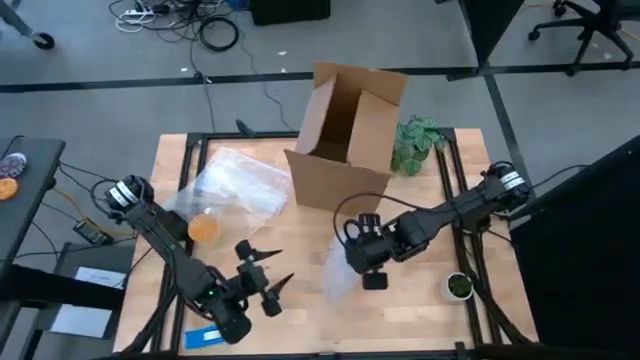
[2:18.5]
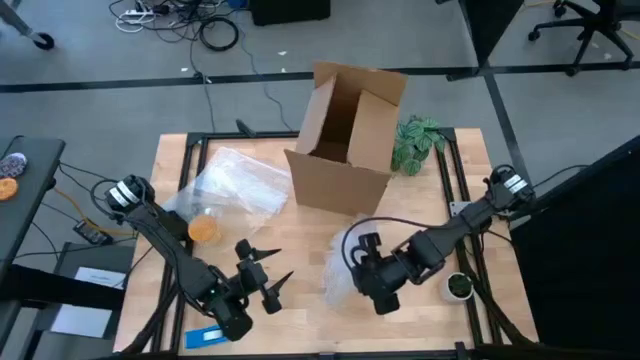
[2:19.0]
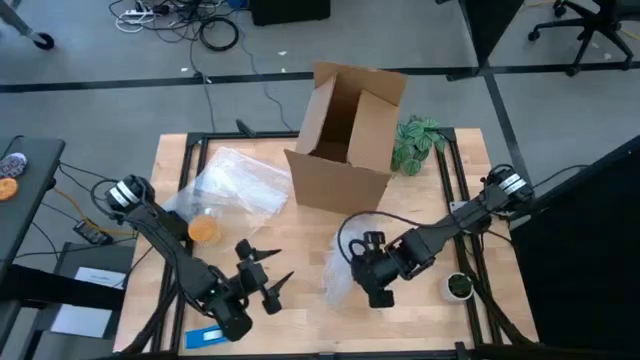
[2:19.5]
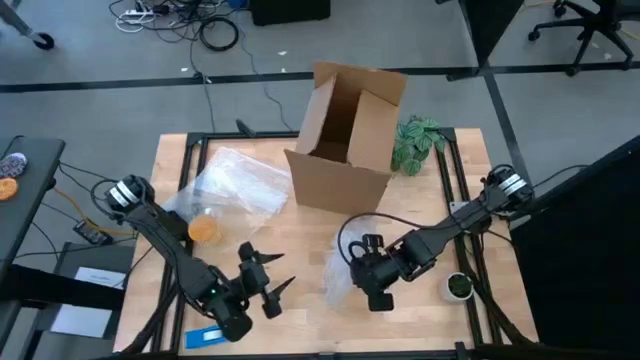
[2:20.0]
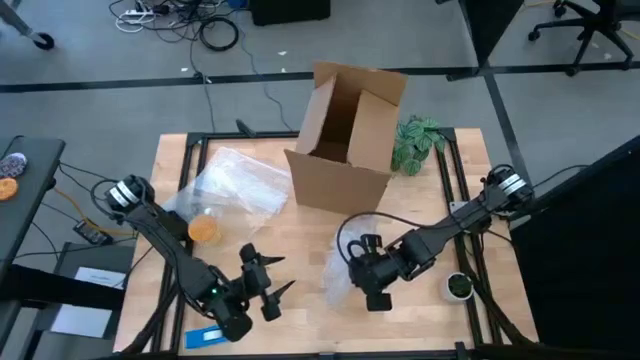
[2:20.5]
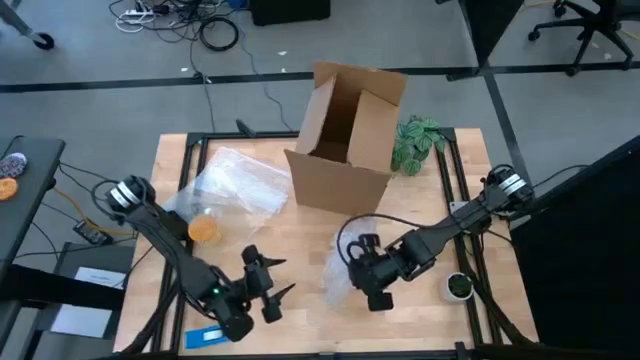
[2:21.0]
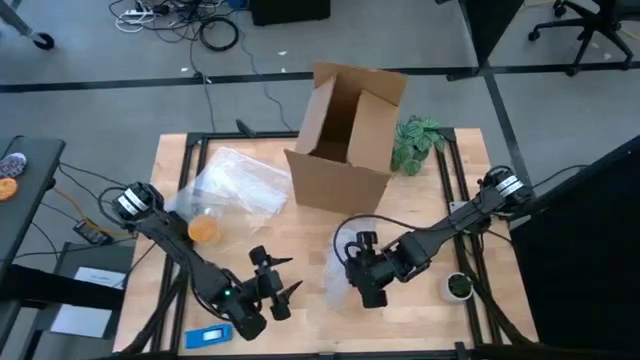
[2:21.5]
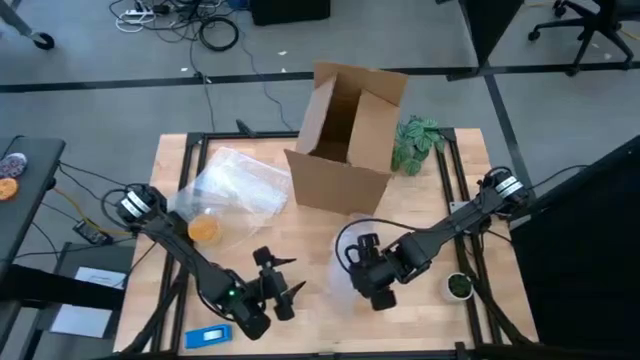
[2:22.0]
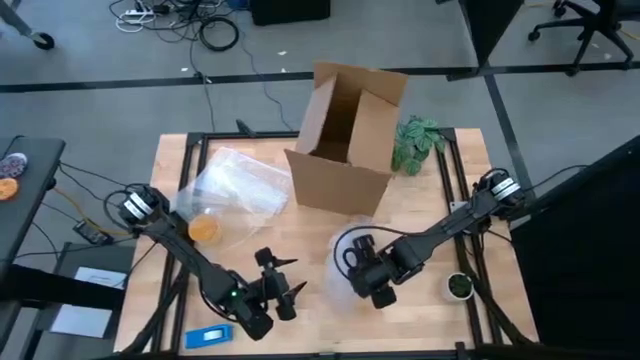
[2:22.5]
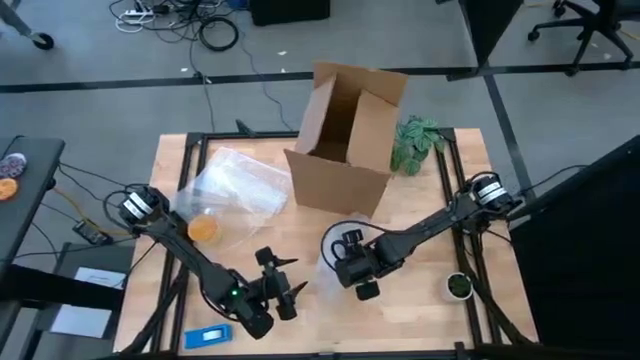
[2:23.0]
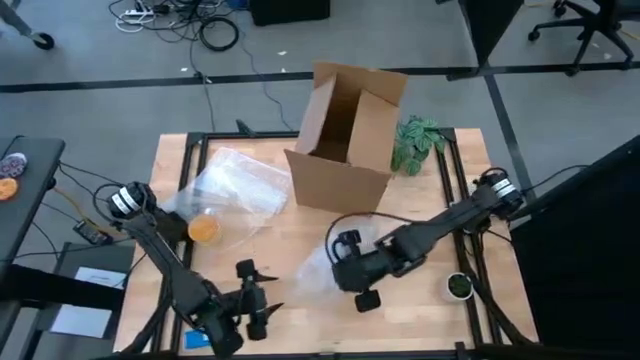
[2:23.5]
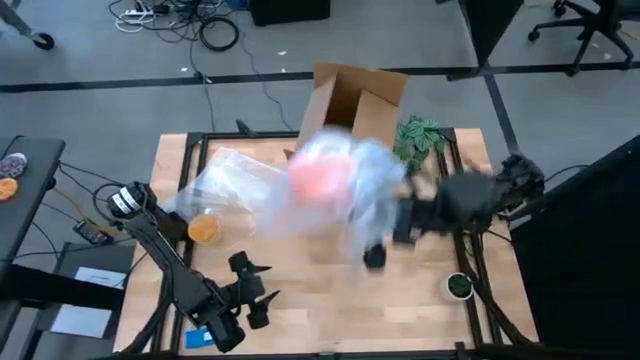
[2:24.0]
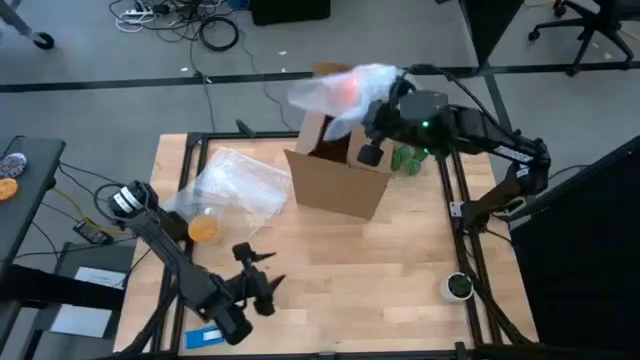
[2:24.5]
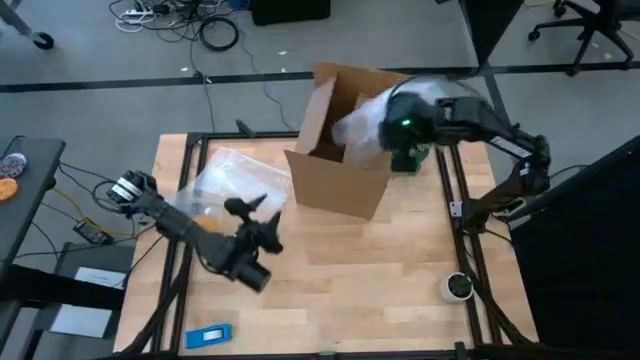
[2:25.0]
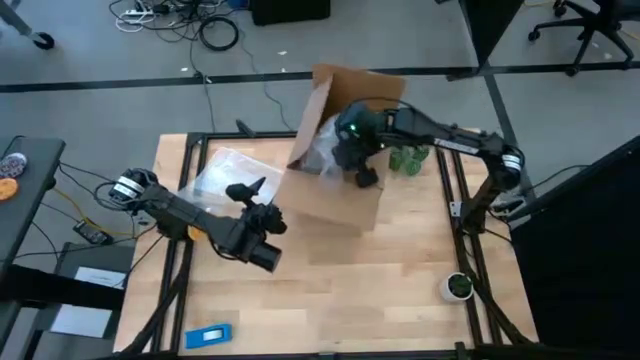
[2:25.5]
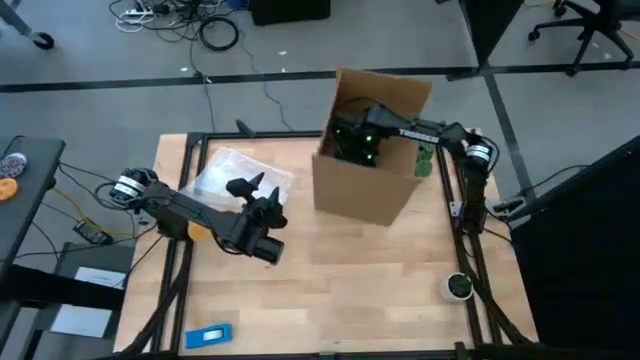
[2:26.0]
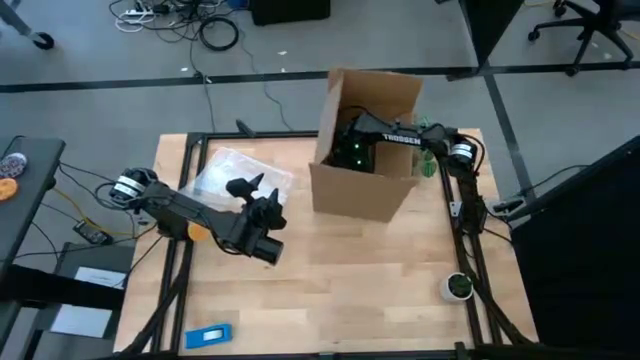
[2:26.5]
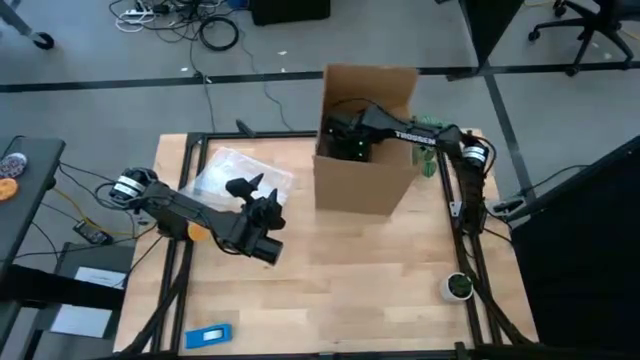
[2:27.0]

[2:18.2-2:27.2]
Task: wrap mug
Put the wrapped orange mug into the cardboard box

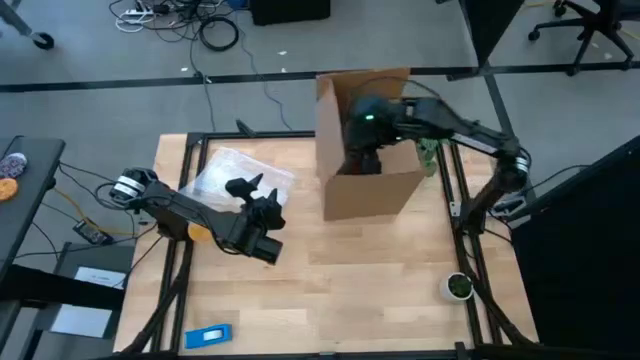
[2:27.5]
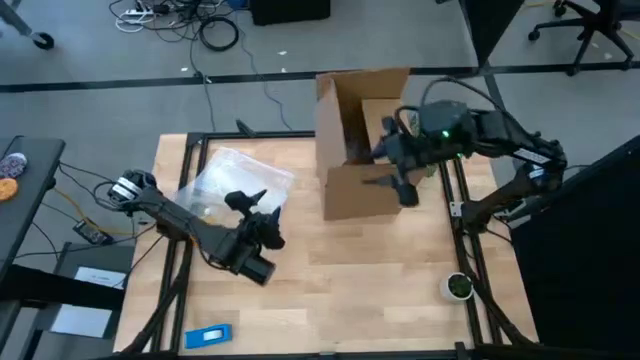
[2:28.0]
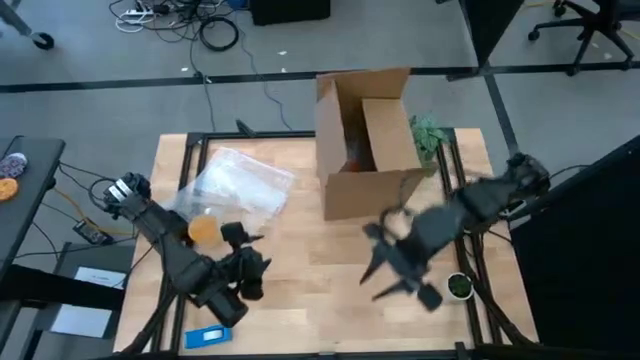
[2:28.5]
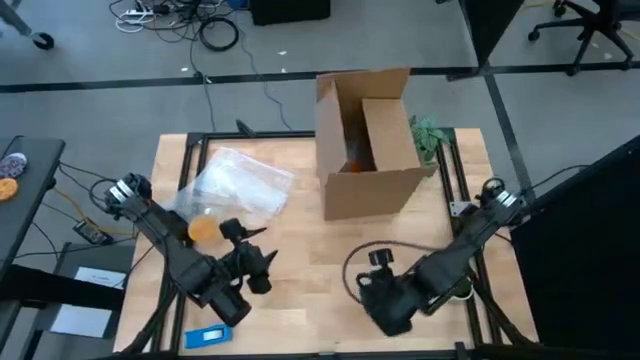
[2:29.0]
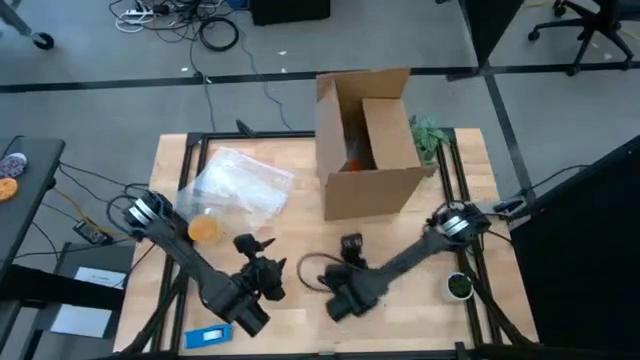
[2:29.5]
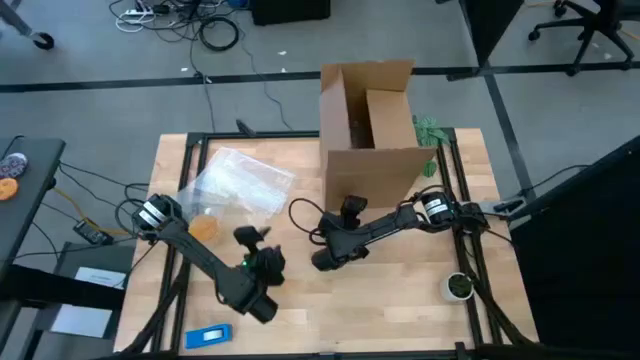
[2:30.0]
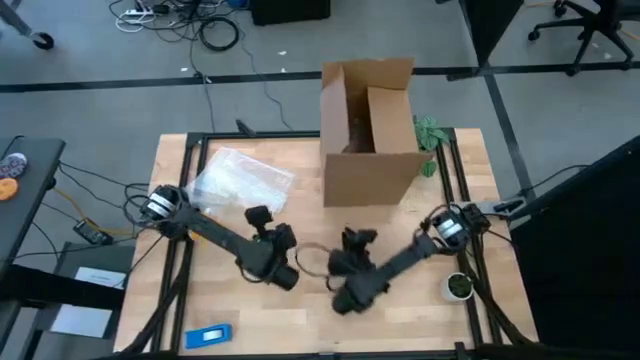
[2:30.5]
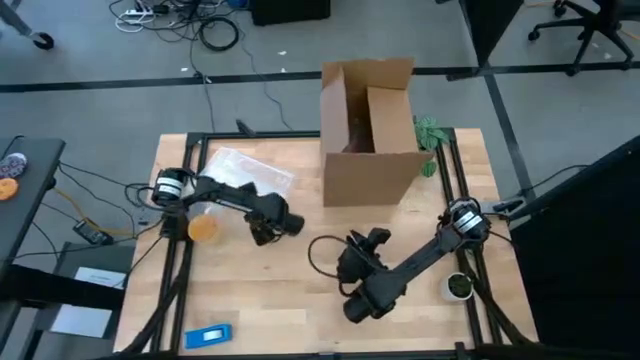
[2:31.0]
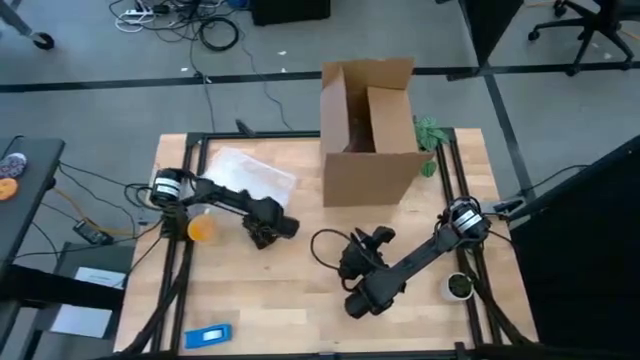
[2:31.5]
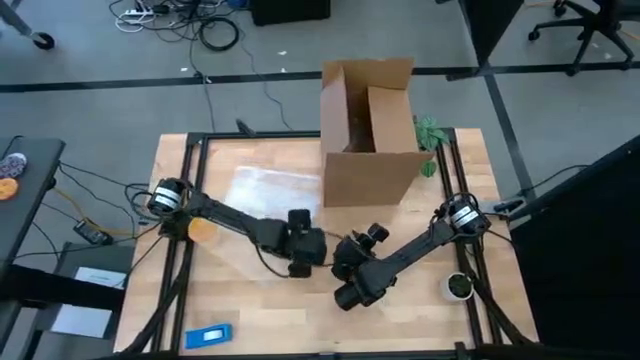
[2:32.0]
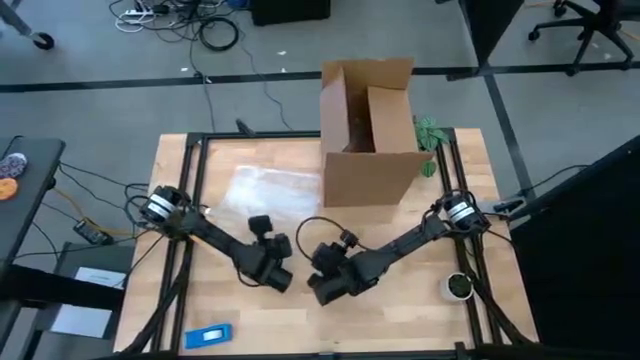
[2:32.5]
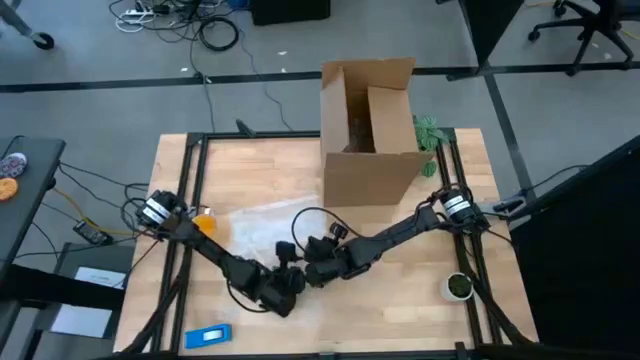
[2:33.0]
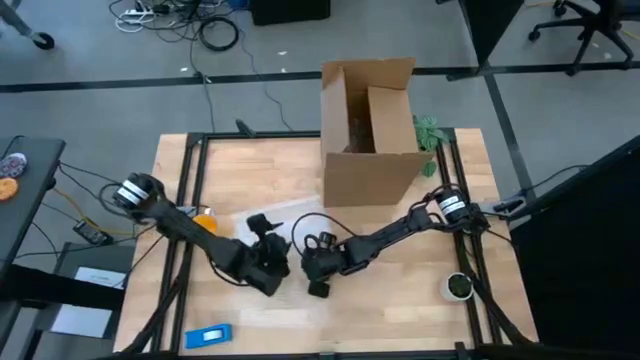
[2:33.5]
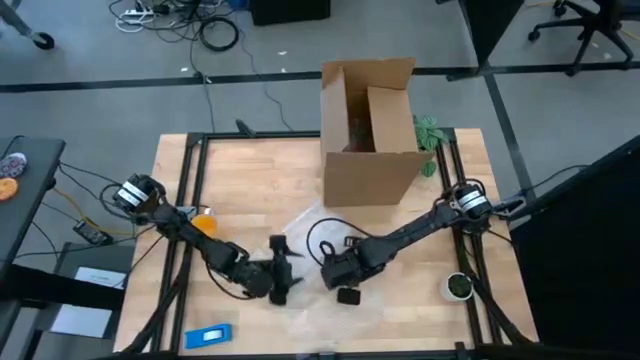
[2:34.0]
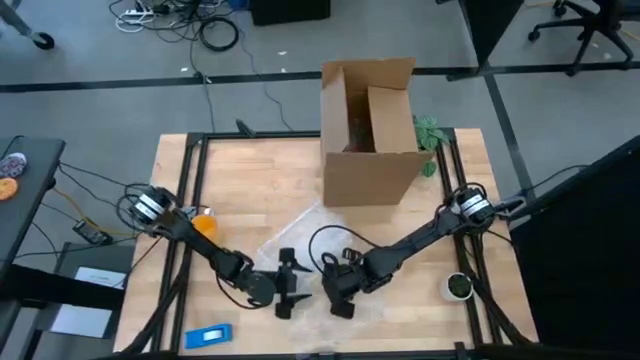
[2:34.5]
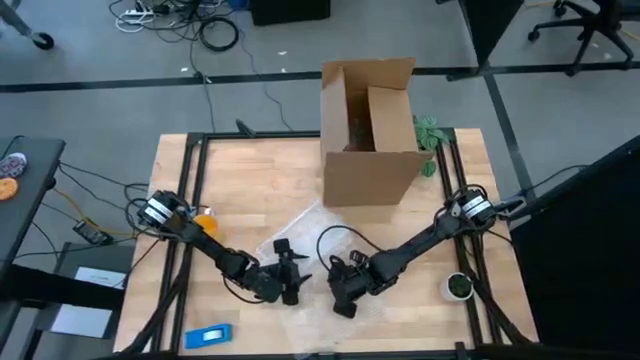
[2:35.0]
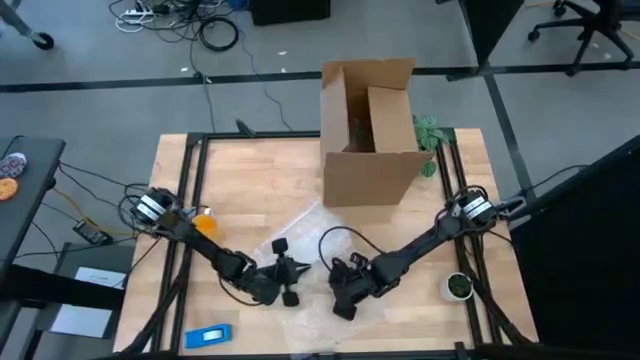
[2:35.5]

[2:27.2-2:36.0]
Wrap the yellow mug with transparent bubble wrap

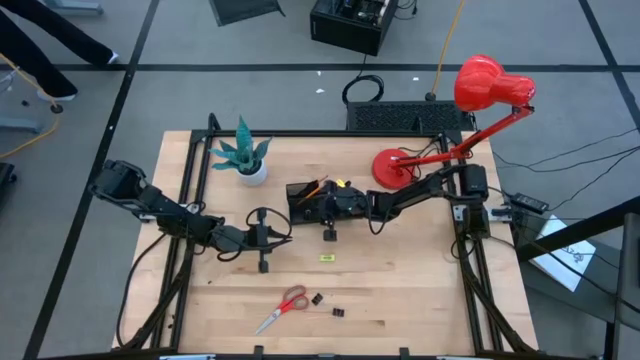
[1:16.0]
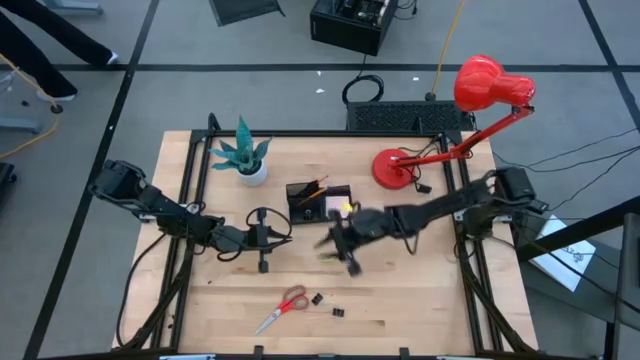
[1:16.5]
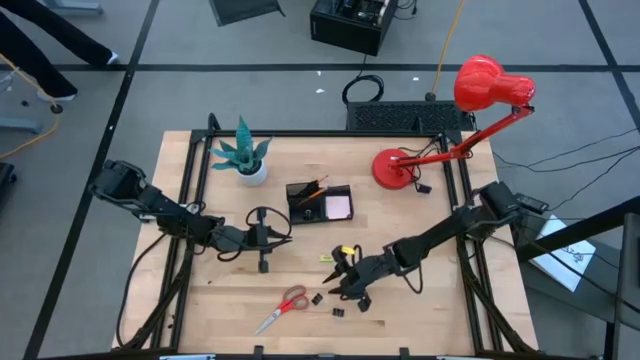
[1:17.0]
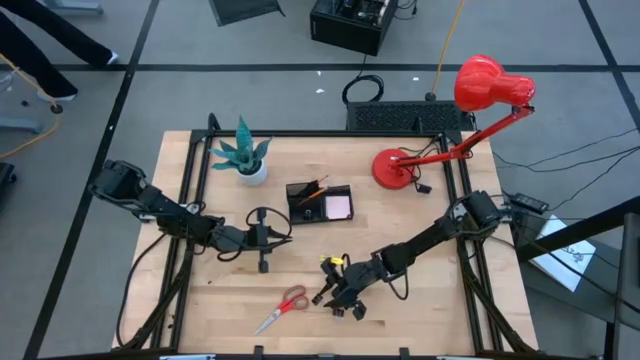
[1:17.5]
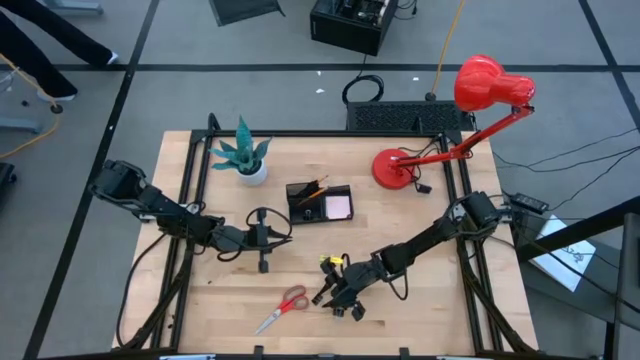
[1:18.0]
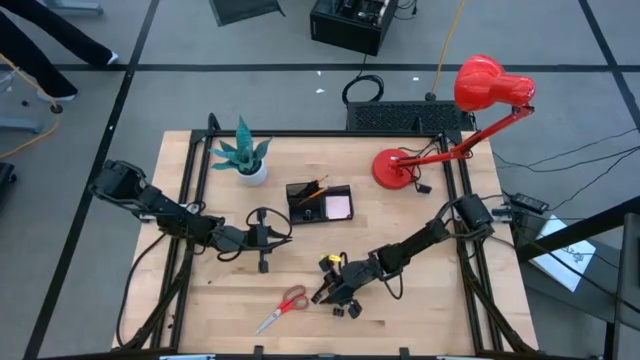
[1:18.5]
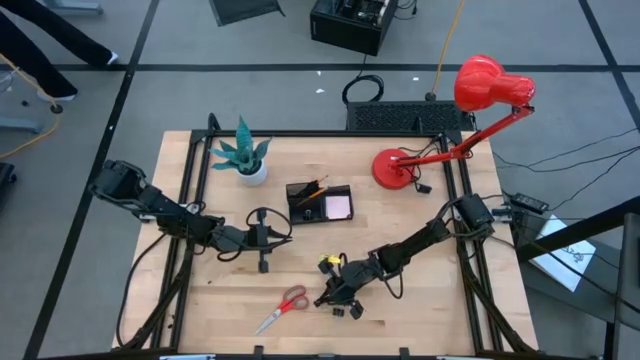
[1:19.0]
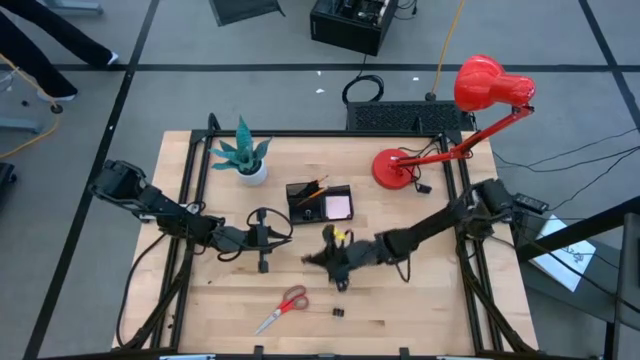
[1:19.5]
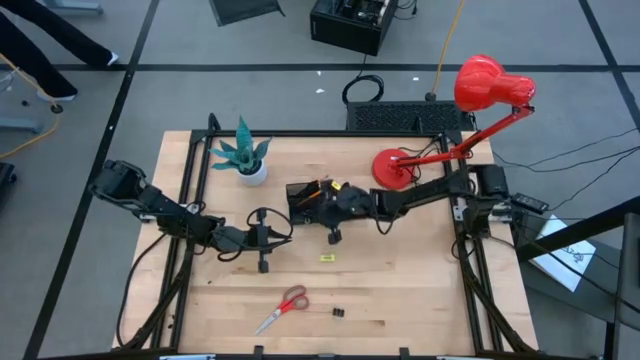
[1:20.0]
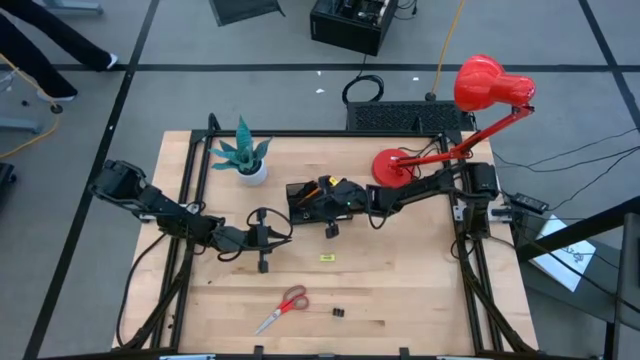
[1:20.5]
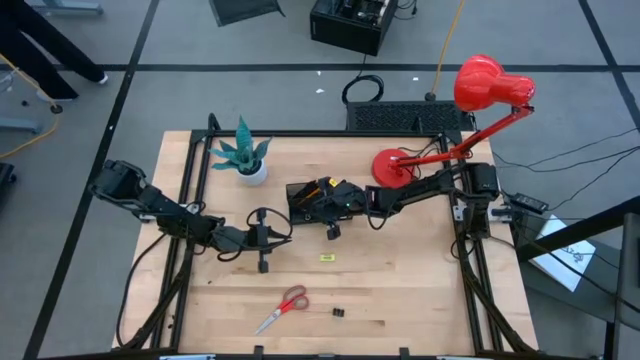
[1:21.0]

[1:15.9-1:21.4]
Task: Pick and place office supplies into organizer
Put the black binder clip into the black desk organizer
